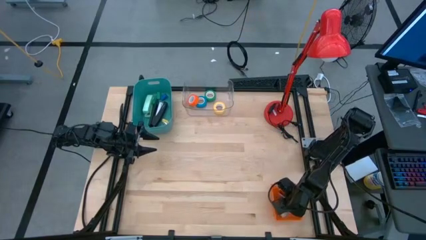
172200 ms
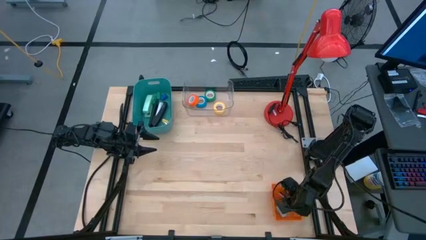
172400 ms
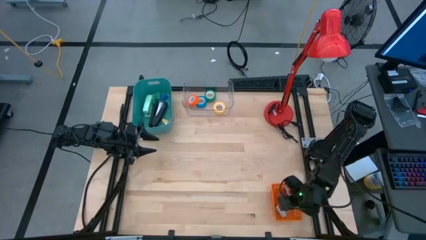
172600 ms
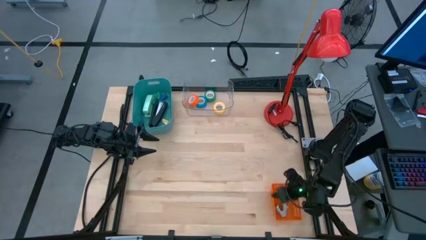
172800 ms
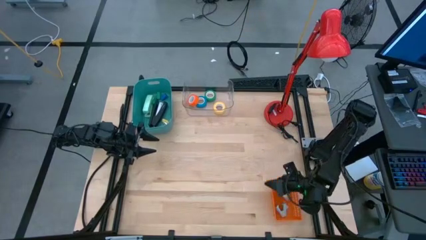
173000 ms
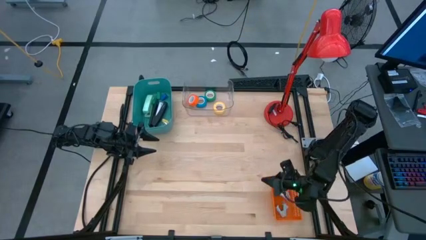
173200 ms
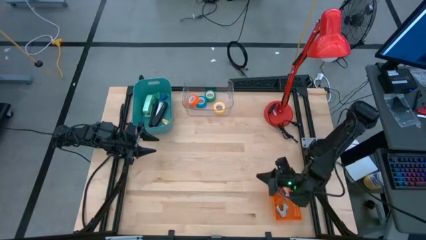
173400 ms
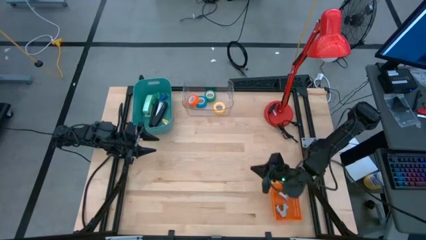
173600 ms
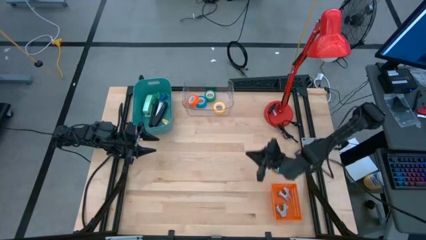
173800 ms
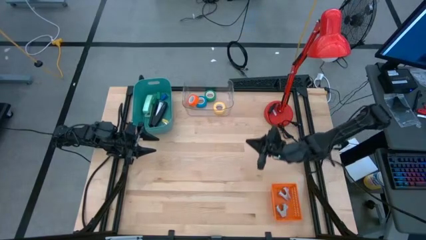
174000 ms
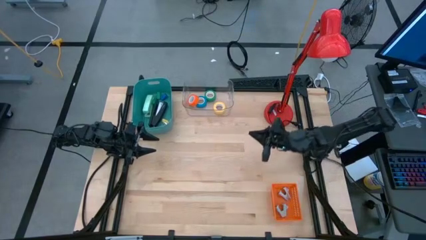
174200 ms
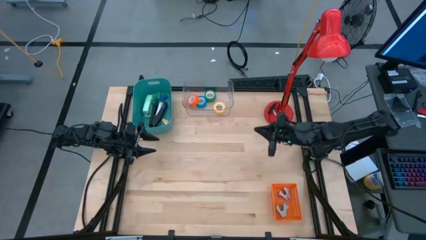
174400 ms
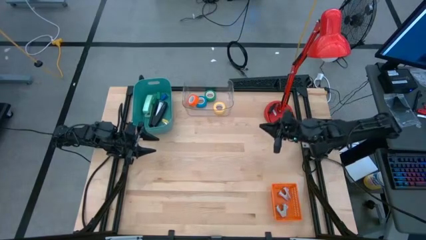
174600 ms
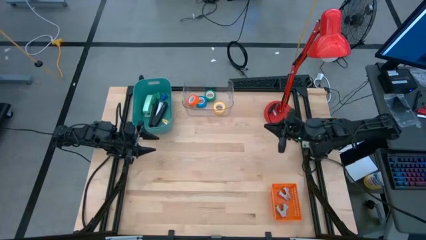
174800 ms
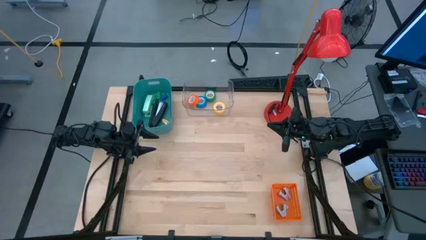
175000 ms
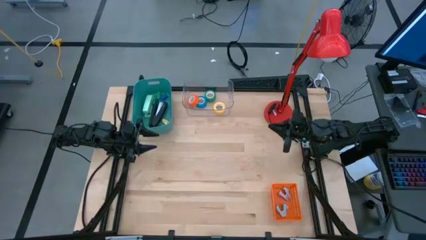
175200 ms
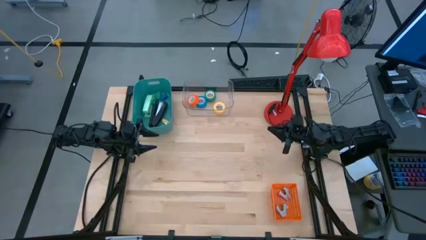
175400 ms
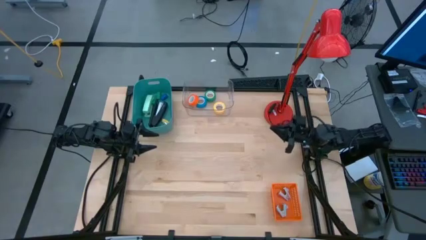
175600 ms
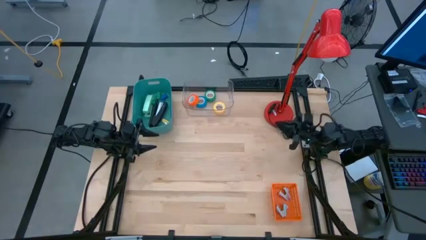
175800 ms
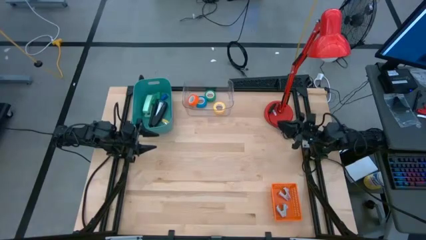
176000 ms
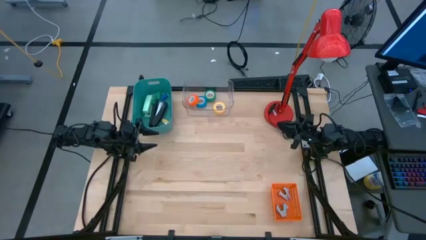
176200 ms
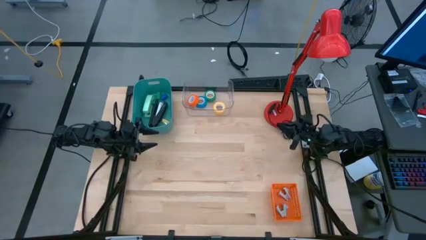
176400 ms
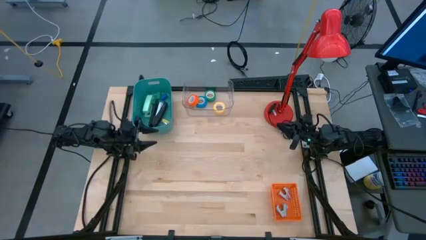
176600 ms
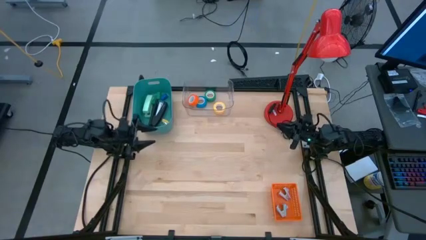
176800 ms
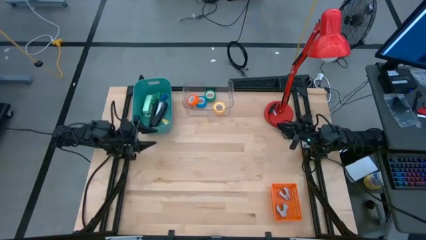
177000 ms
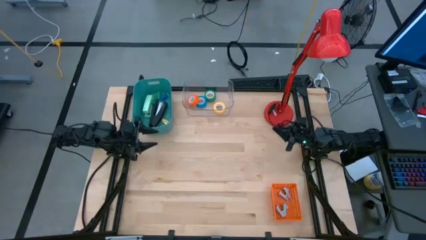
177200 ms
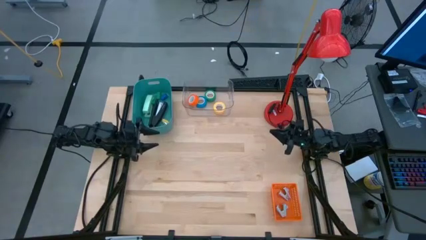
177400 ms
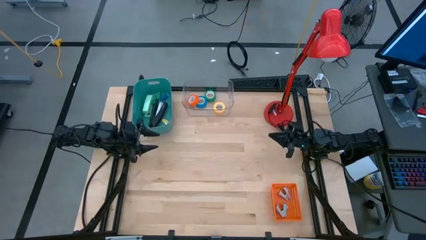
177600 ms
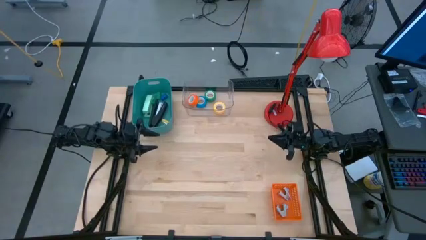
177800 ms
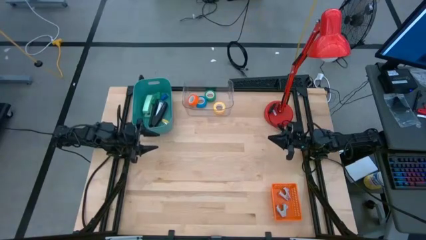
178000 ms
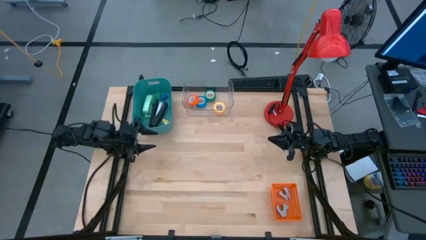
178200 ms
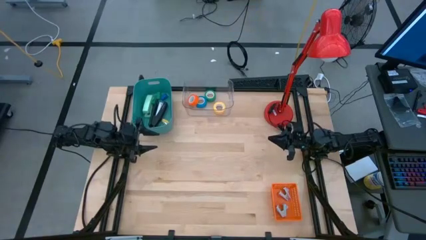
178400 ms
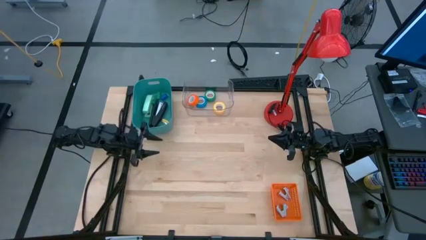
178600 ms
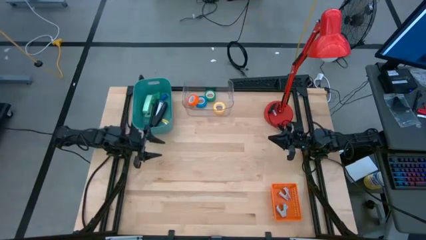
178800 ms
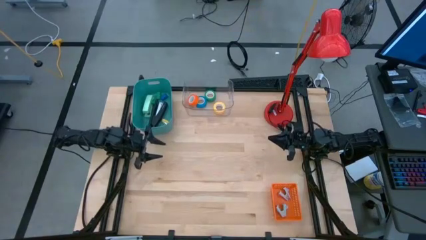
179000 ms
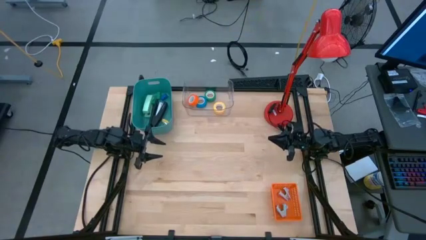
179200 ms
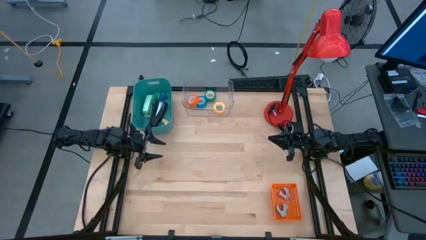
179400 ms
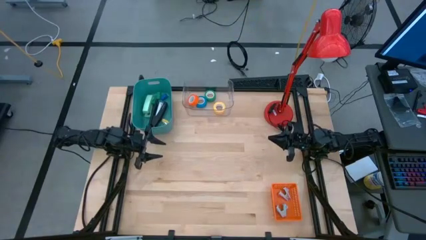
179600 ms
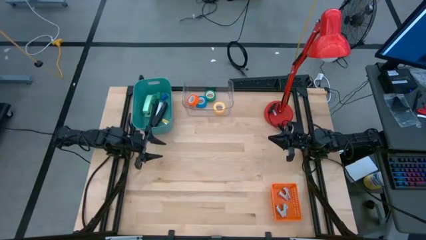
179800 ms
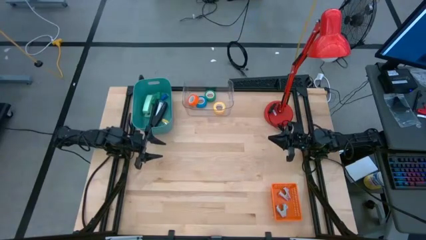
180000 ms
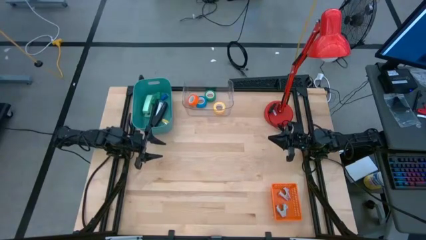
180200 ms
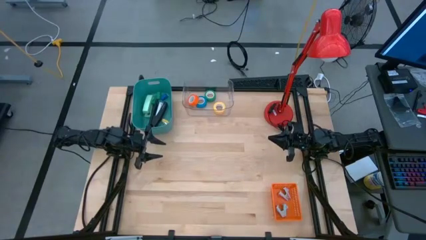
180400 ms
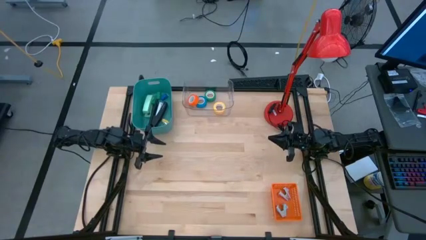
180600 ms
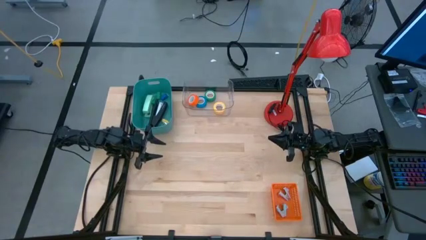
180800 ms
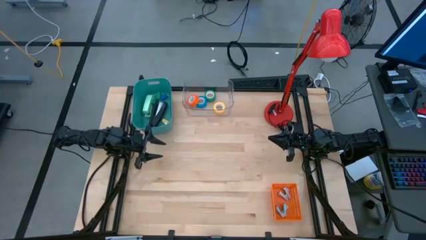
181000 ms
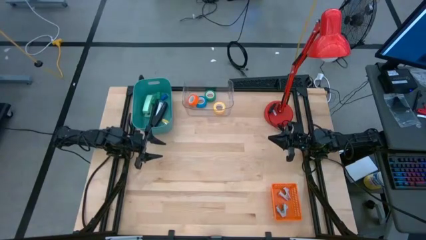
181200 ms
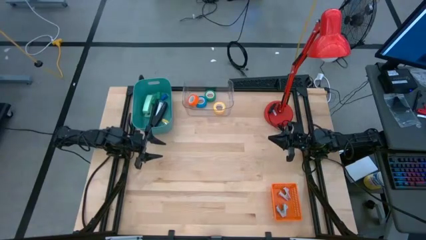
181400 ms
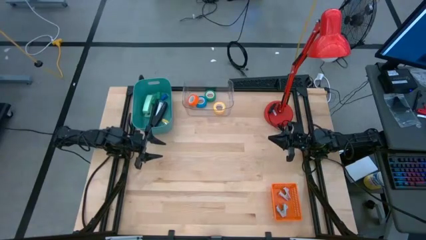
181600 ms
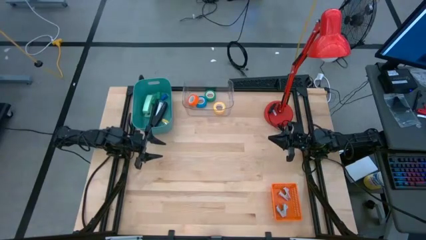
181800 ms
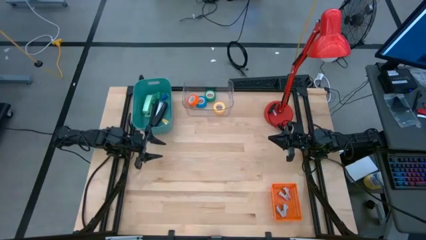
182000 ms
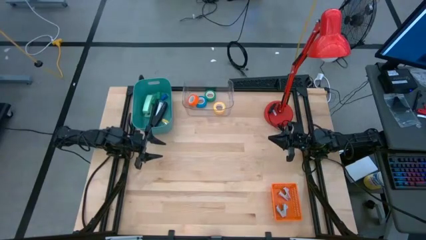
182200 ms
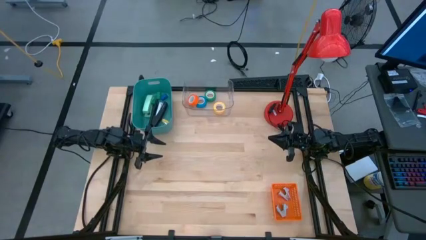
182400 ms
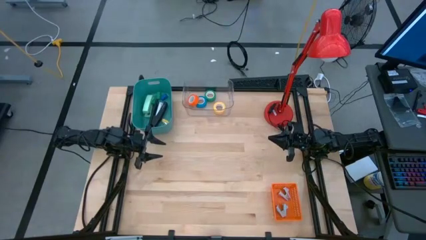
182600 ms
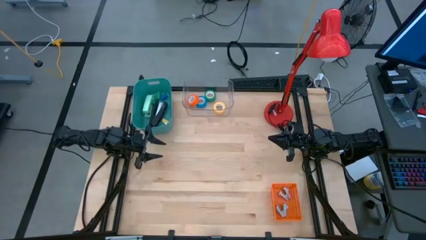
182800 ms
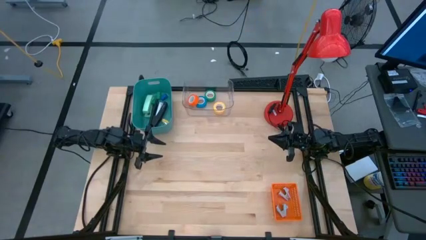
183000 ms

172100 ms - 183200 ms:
Task: Pick and place Stapler, Stapler remover, tape
Return to Home Position
